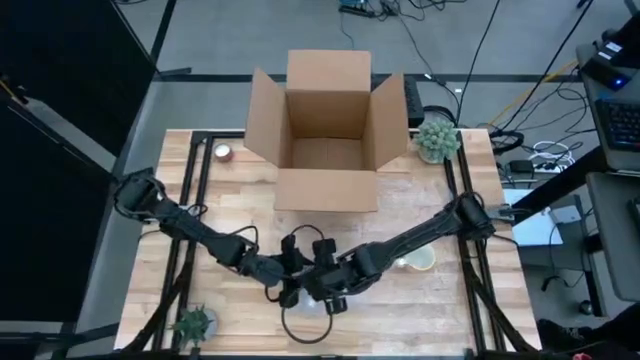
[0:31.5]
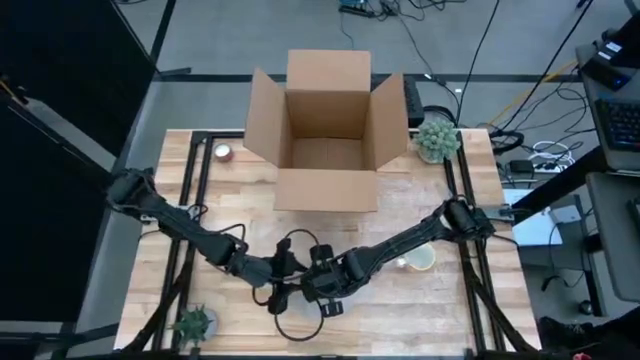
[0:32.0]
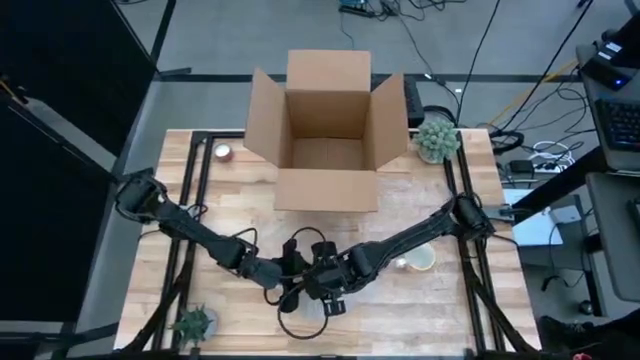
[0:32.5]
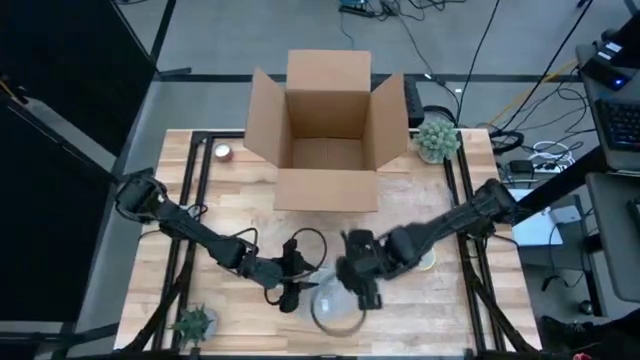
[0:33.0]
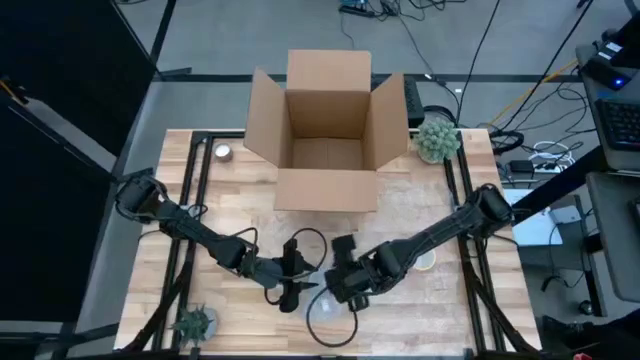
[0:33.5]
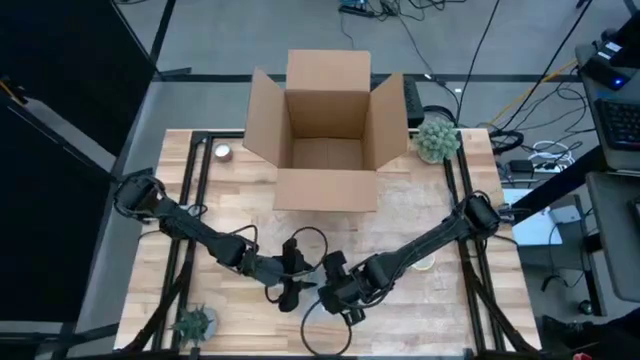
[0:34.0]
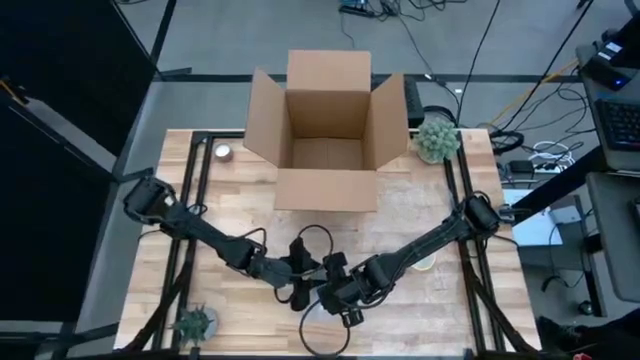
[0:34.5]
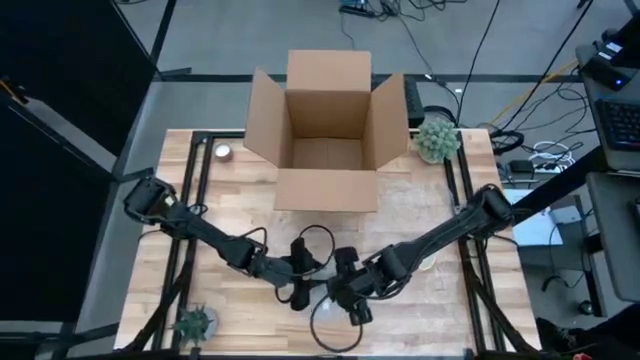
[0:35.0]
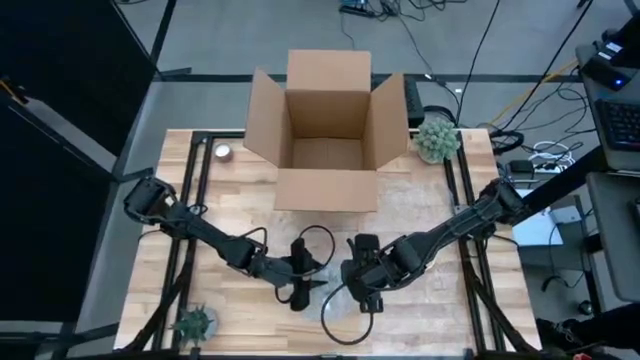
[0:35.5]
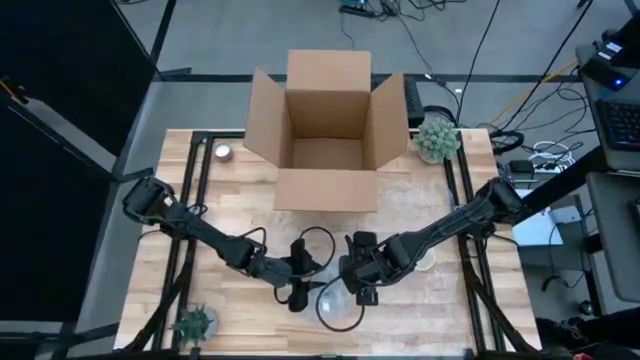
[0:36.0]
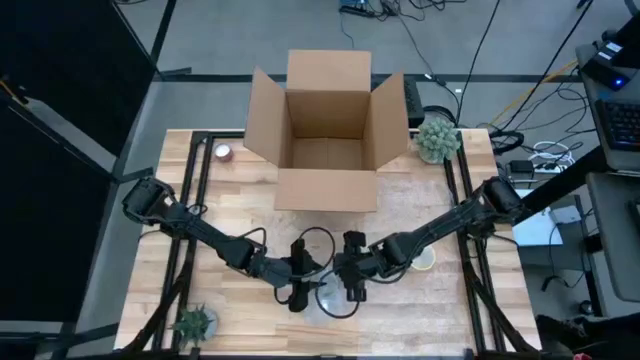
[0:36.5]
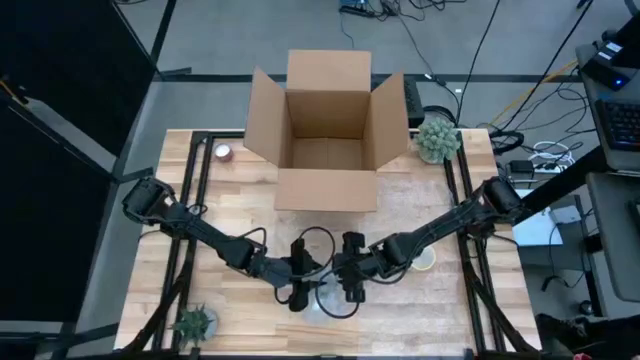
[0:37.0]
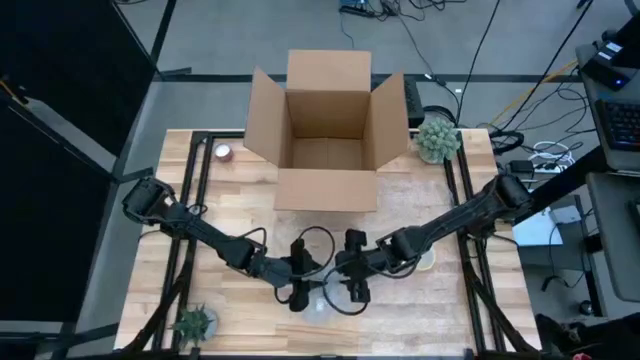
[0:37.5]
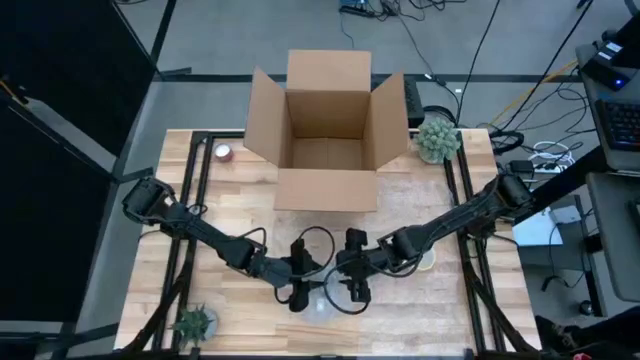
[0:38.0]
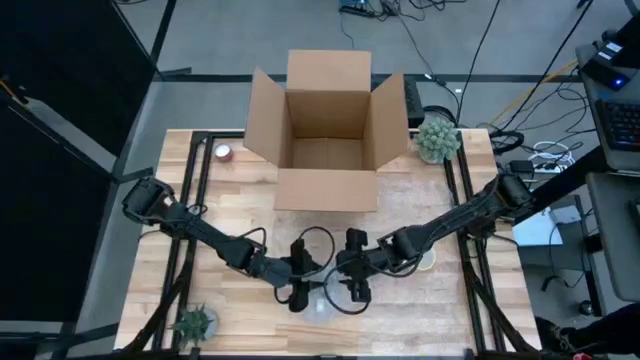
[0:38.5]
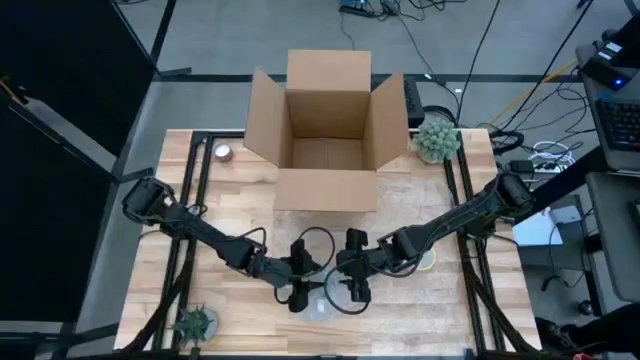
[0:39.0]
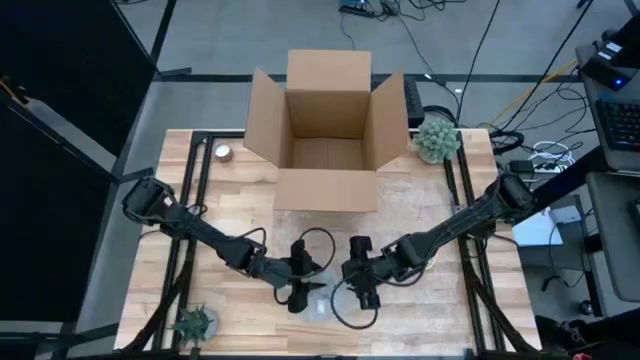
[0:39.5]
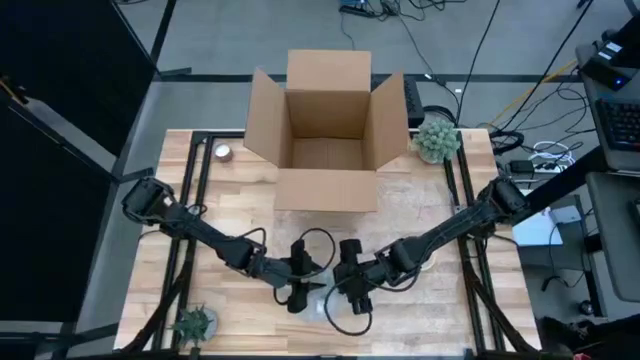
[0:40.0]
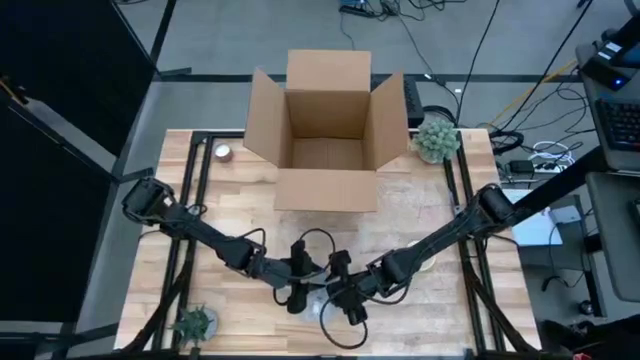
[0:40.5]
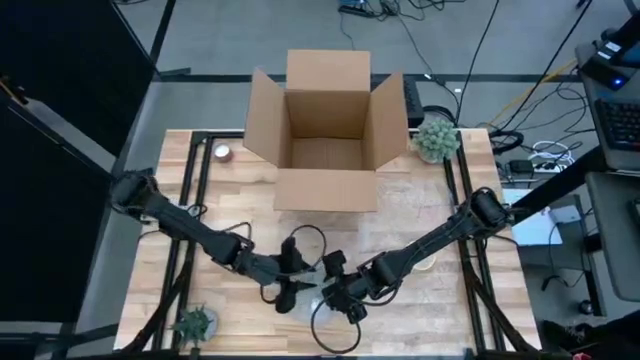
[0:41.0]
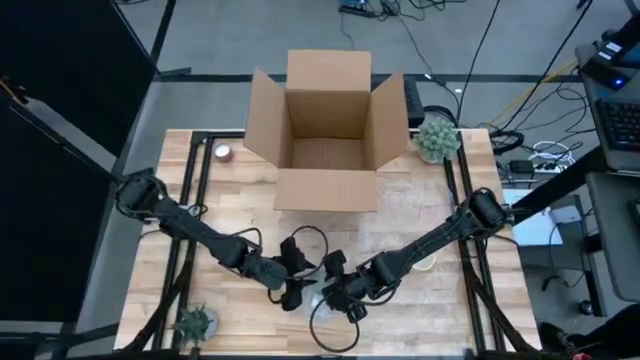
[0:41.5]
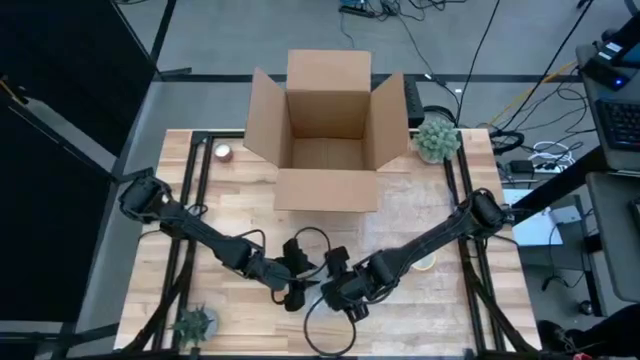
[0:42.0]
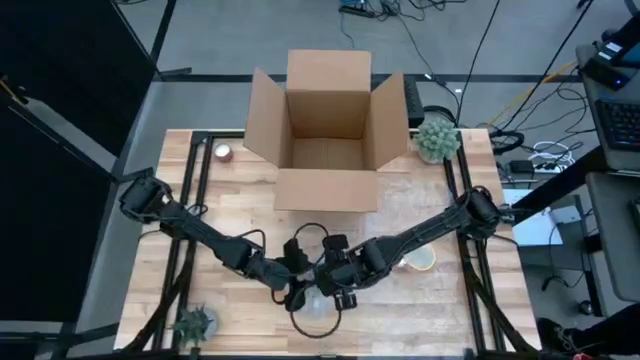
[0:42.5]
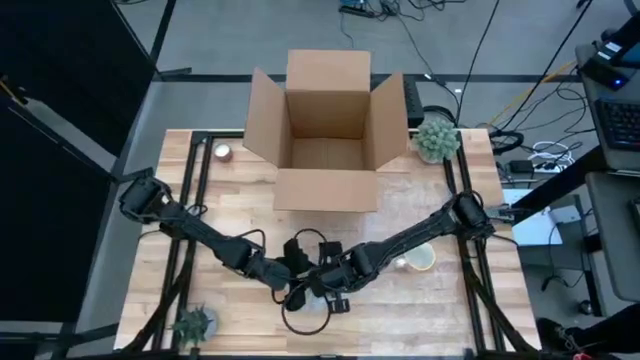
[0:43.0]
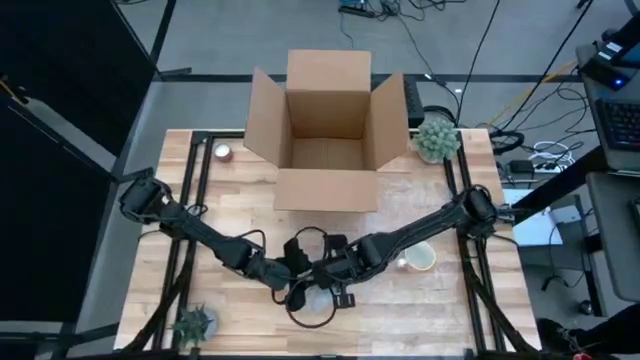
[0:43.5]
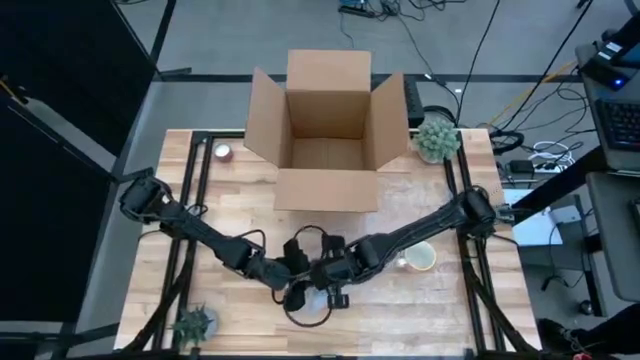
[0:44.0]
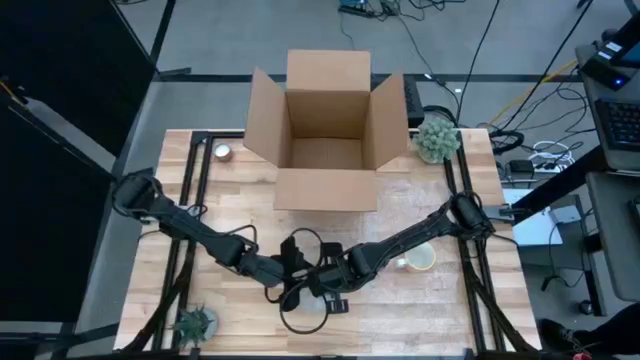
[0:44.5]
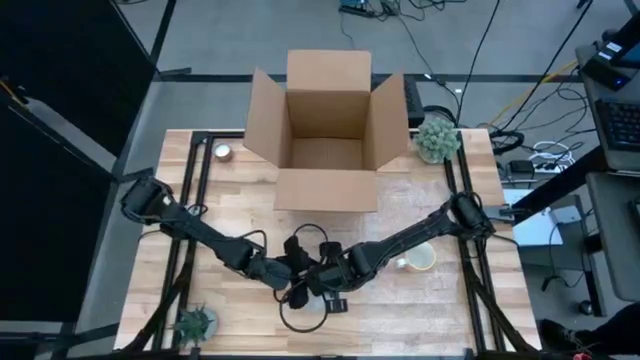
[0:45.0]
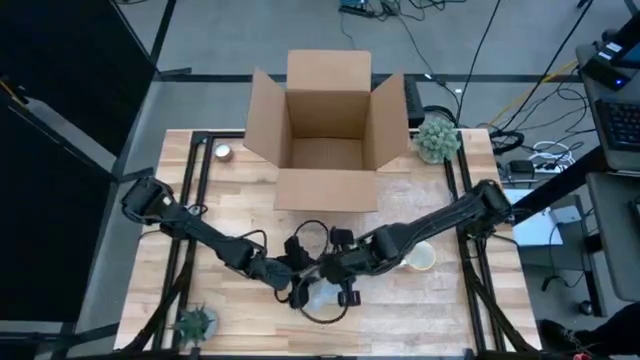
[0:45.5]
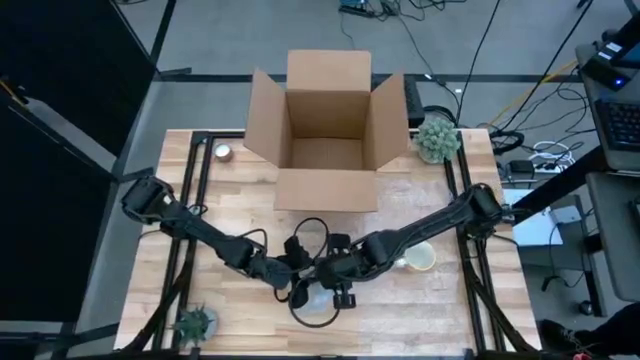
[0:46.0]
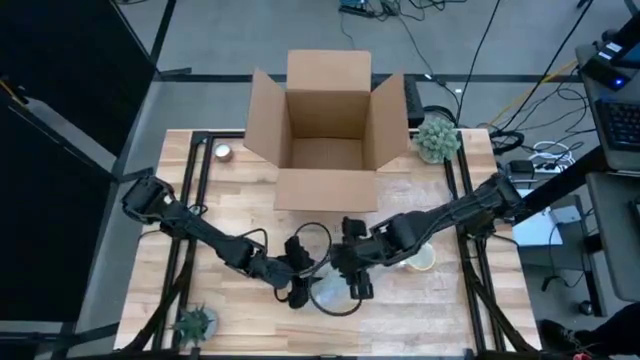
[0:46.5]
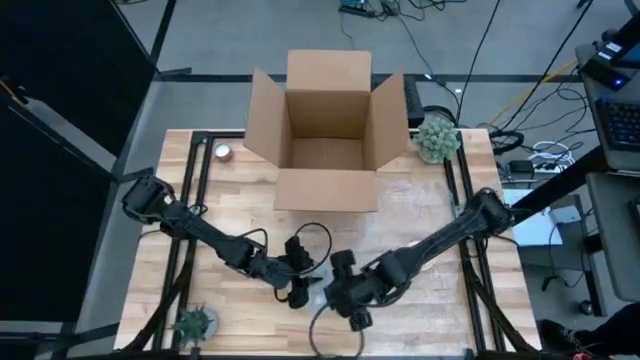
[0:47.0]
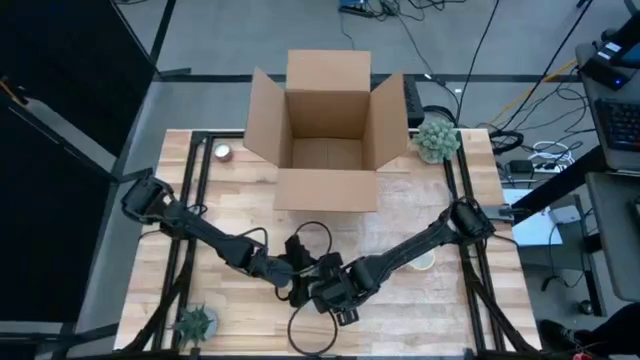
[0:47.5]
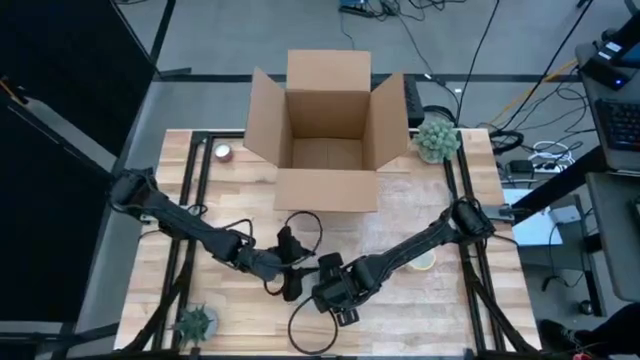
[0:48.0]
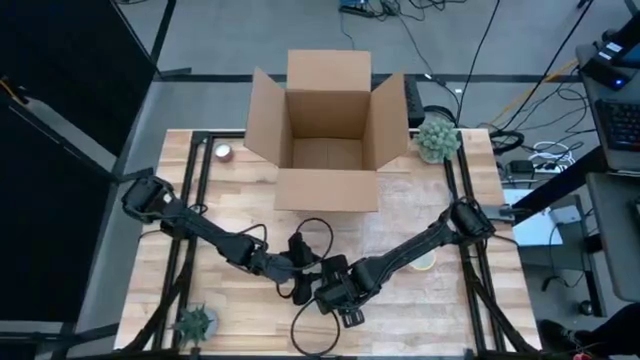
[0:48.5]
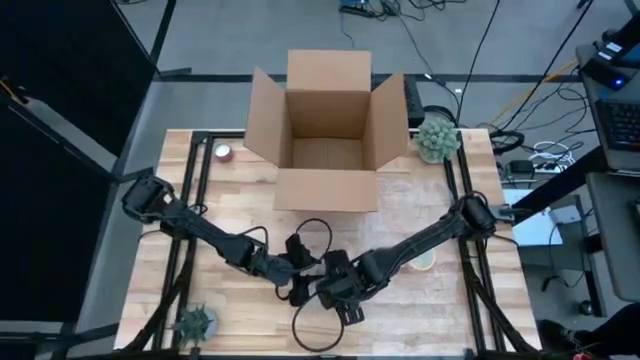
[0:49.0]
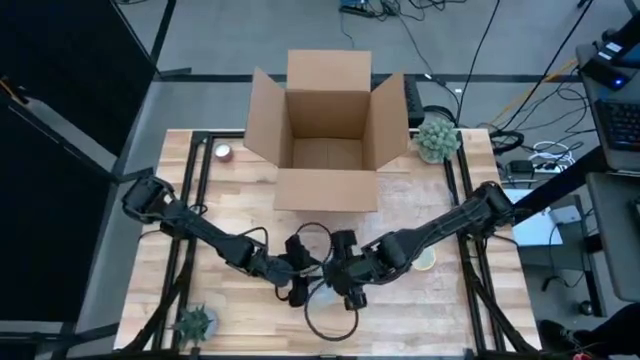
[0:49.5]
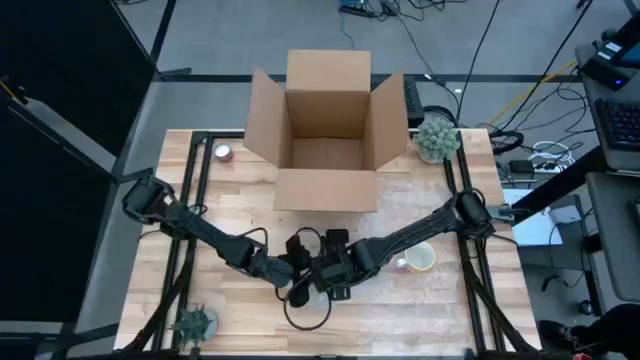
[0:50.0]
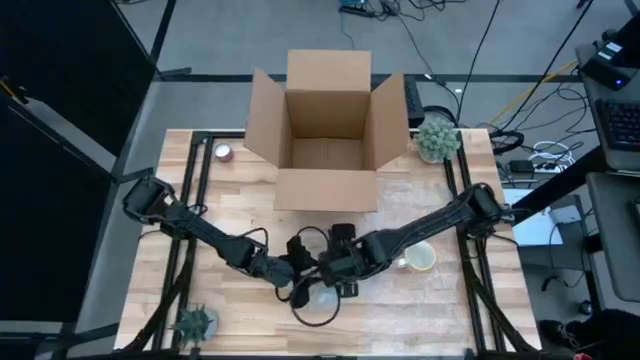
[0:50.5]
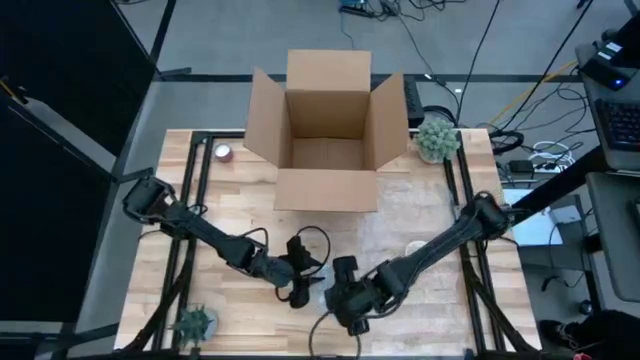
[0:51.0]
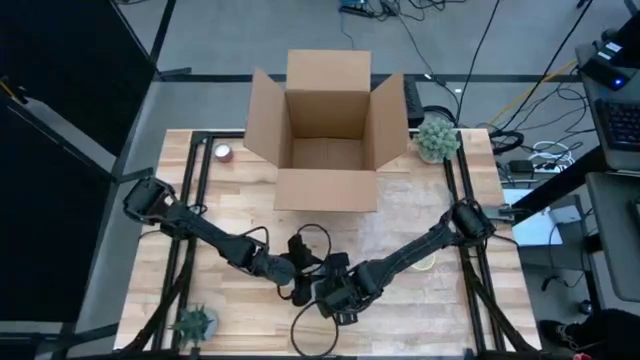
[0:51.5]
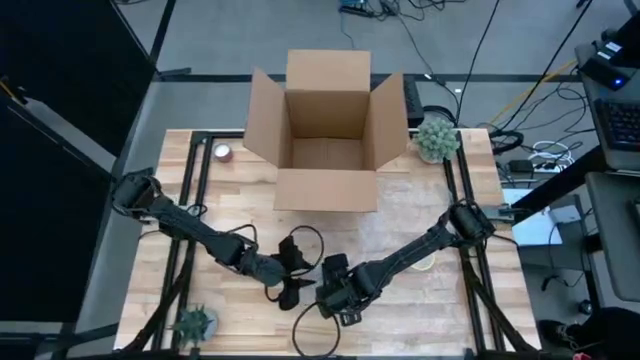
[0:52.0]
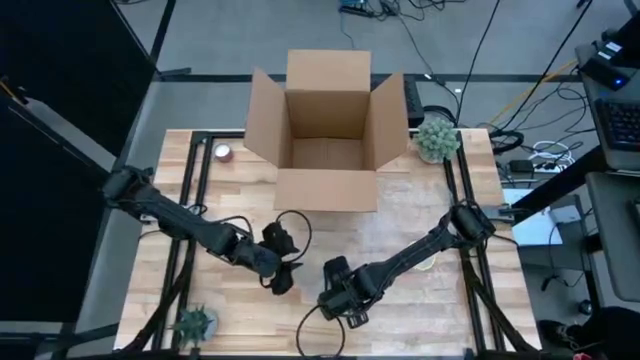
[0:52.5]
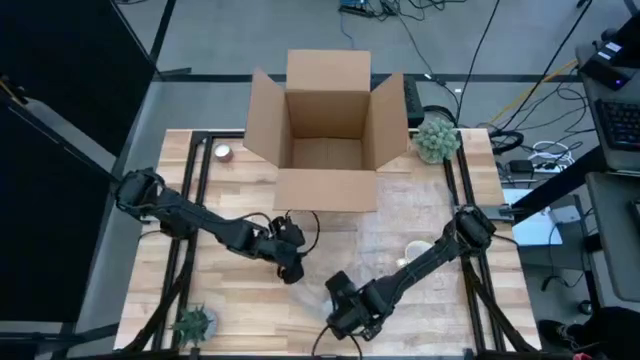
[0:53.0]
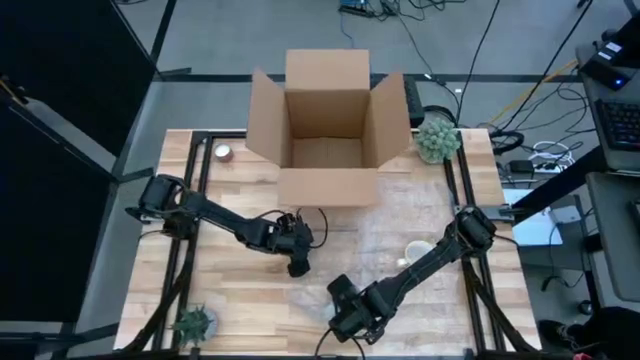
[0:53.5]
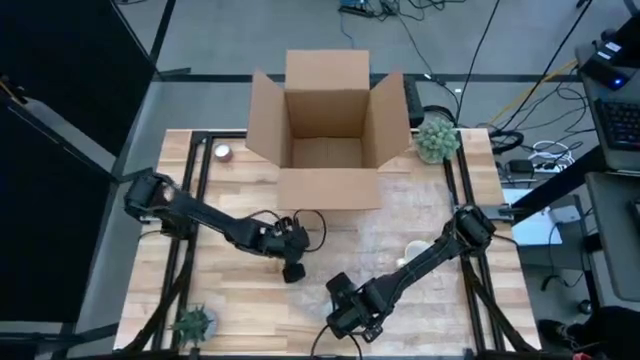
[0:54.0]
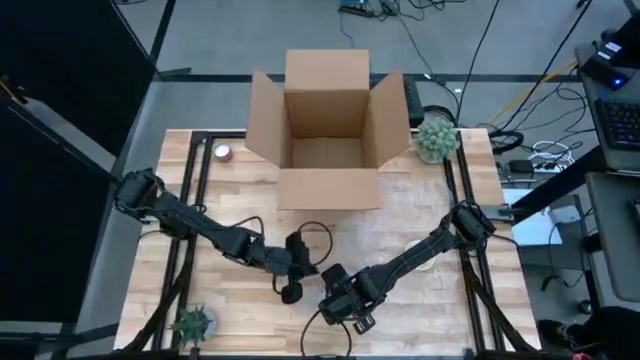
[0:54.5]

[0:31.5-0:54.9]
Task: wrap mug
Wrap the red cup with the left transparent bubble wrap
